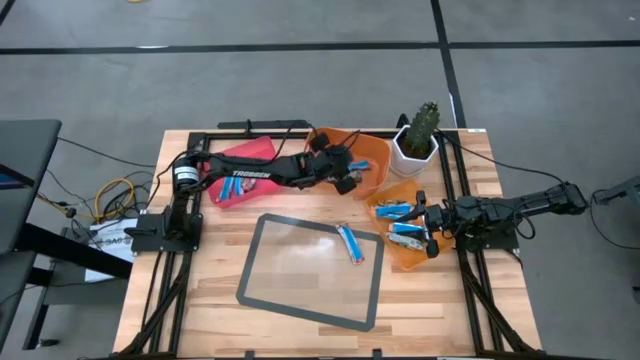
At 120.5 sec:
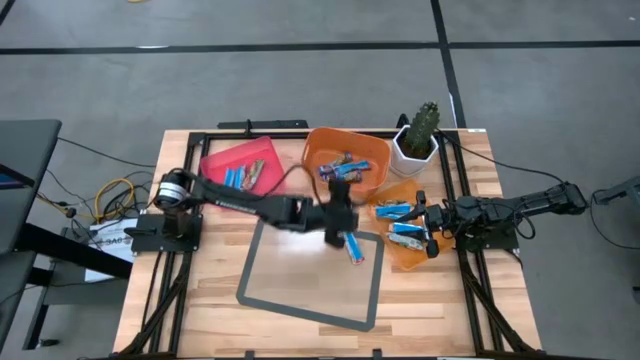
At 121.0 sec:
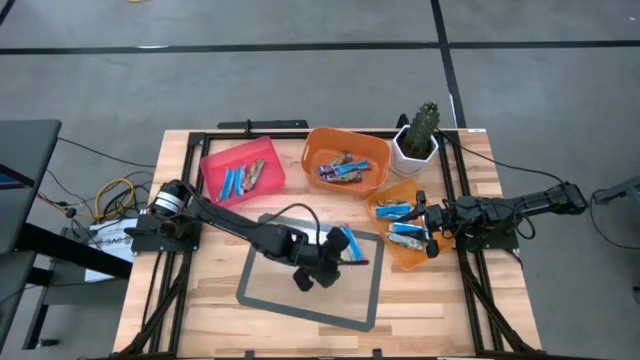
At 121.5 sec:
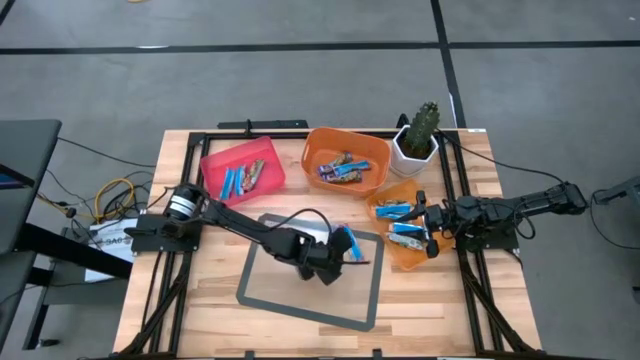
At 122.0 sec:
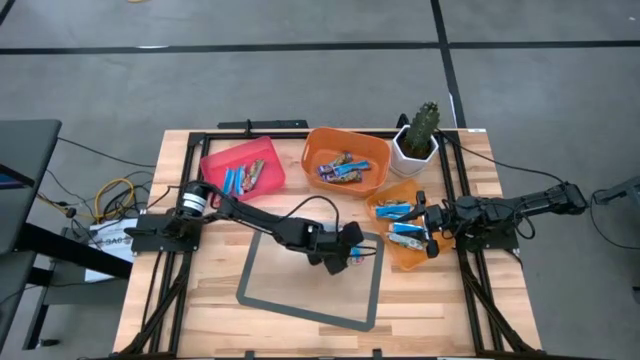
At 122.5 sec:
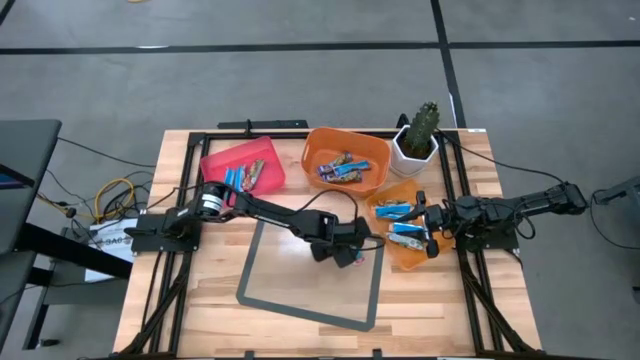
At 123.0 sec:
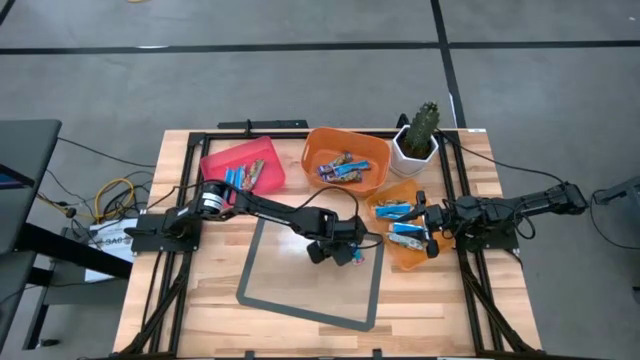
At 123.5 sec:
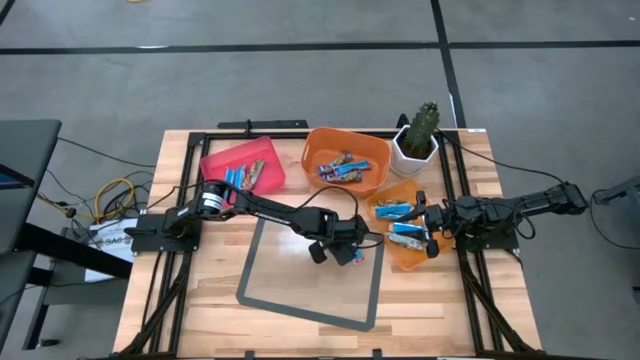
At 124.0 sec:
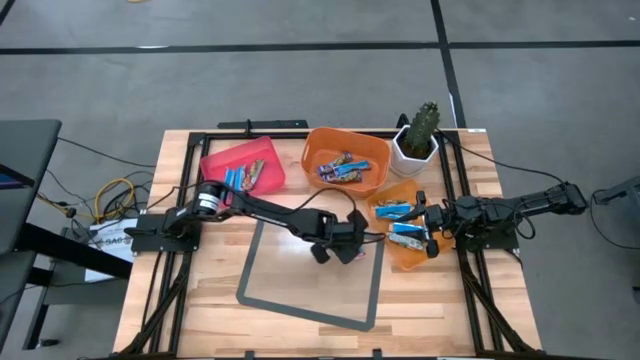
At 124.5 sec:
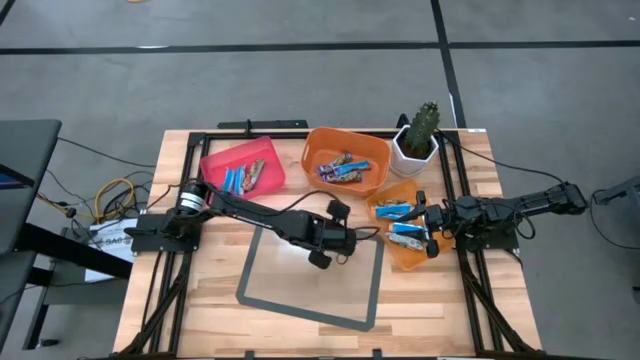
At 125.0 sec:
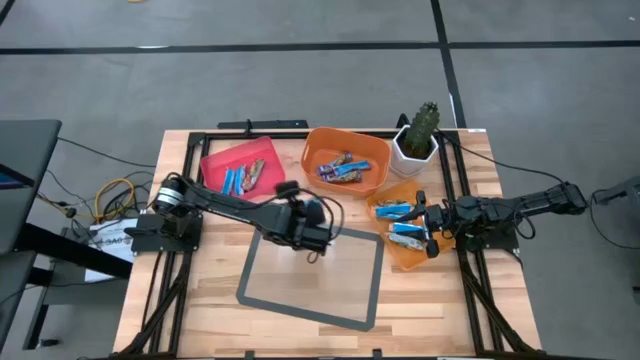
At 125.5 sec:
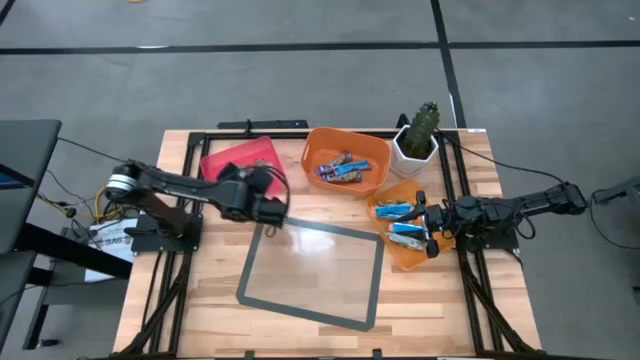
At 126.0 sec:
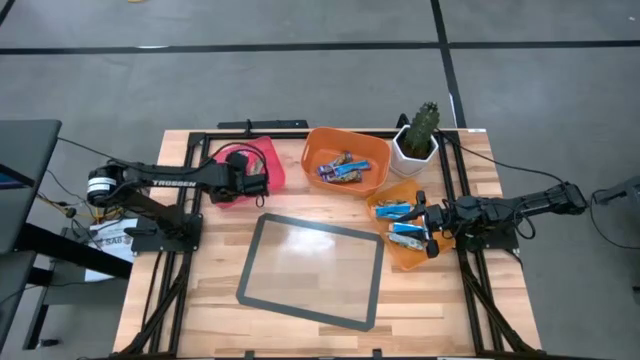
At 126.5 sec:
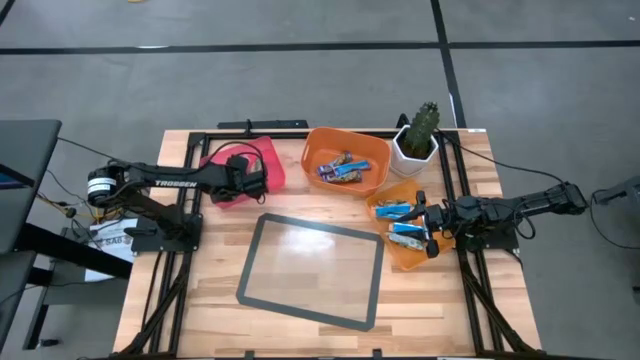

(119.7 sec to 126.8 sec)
Task: Pick and place Granola Bars by type
Put the red granola bar into the red bin

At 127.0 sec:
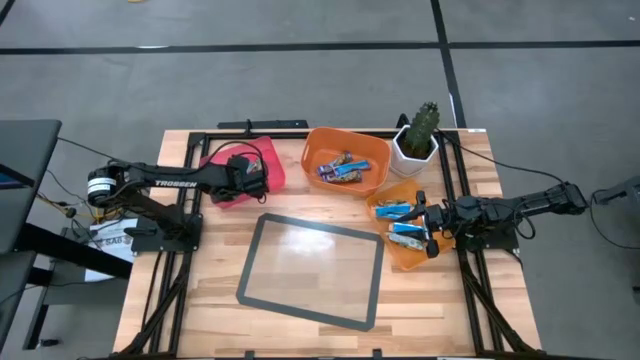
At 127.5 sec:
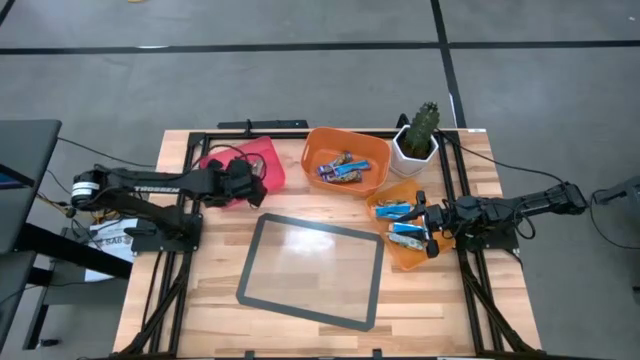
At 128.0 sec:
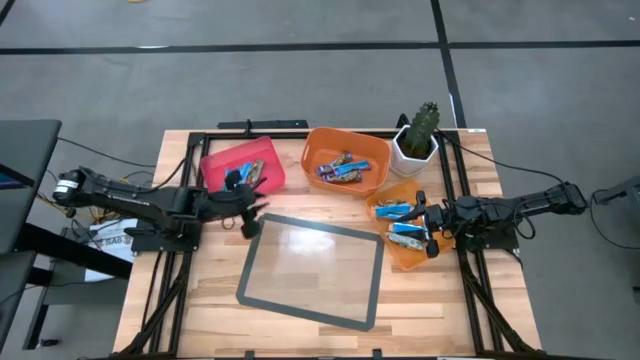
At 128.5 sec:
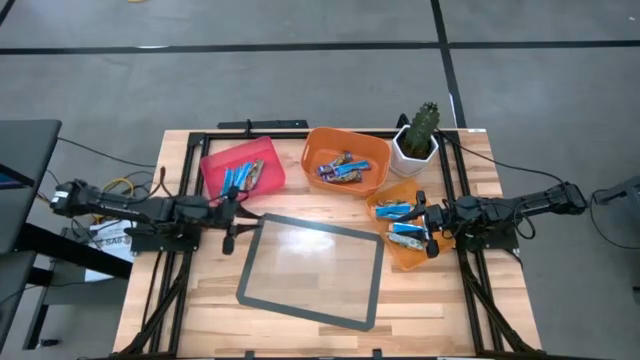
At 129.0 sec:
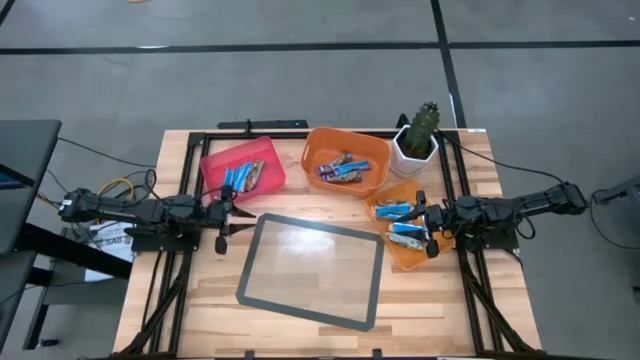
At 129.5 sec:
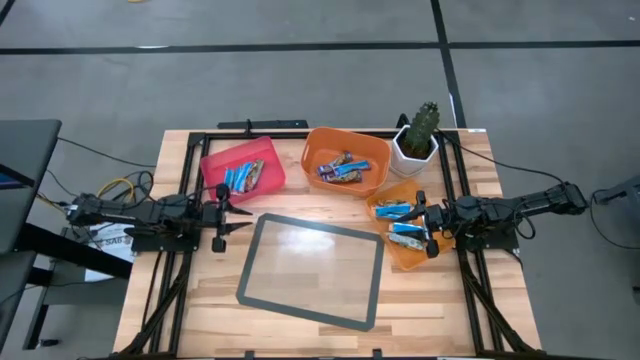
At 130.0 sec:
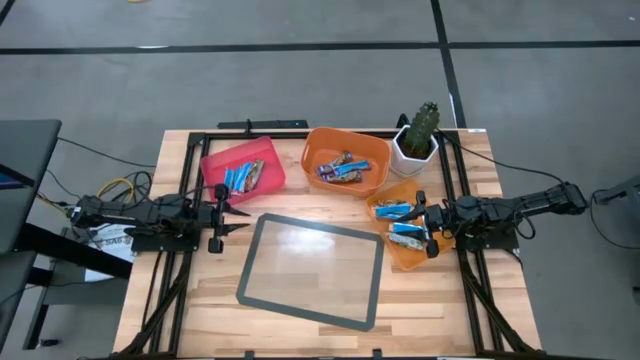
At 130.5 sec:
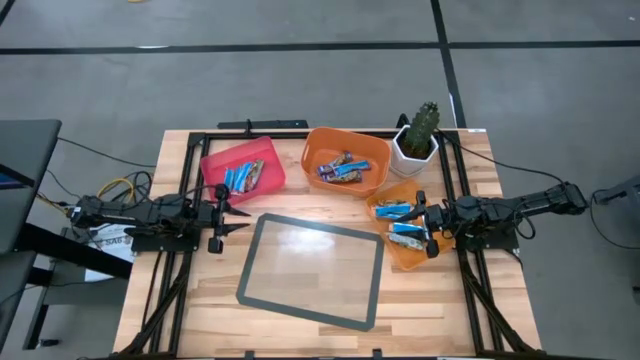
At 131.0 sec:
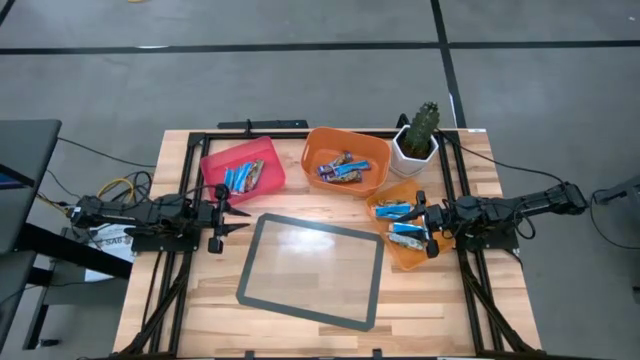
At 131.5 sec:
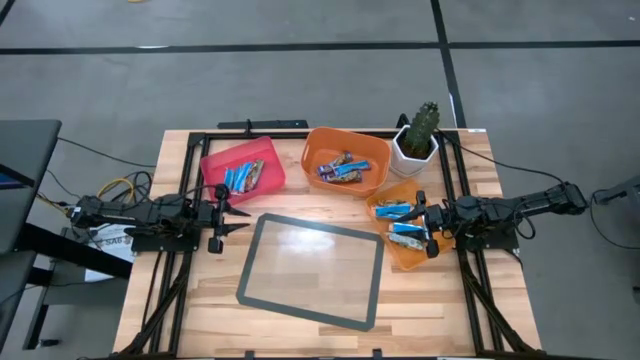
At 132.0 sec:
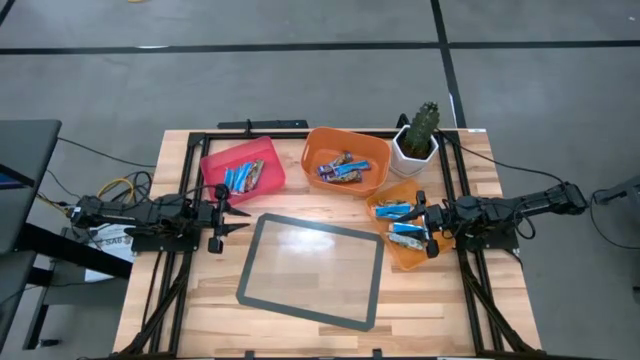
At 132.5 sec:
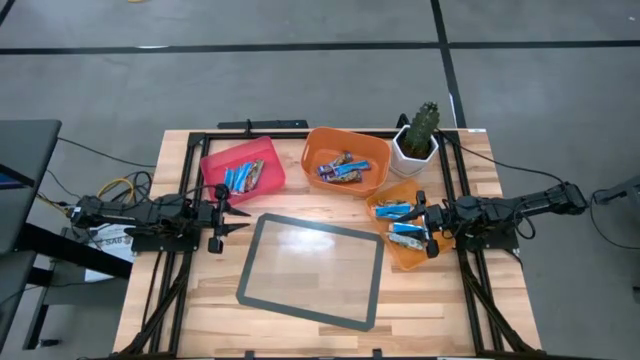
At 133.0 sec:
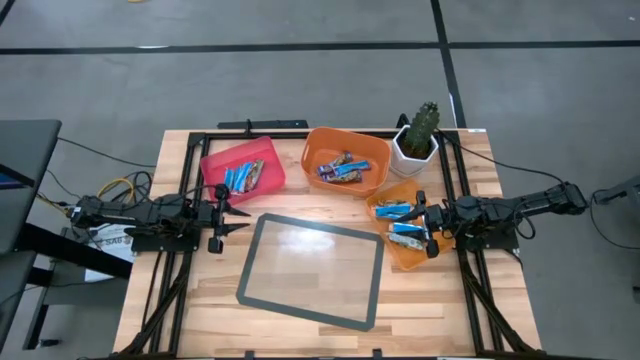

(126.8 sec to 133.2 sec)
Return to Home Position

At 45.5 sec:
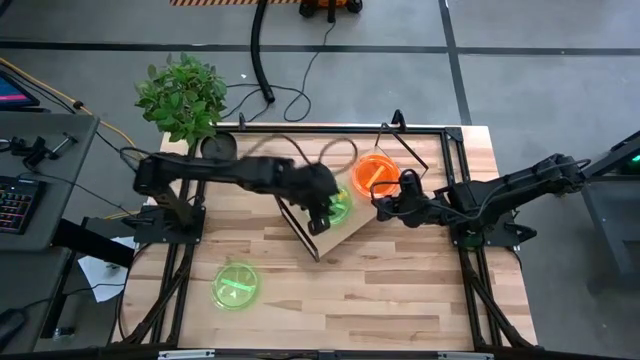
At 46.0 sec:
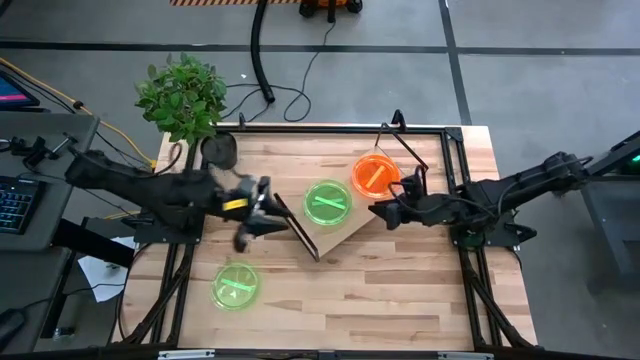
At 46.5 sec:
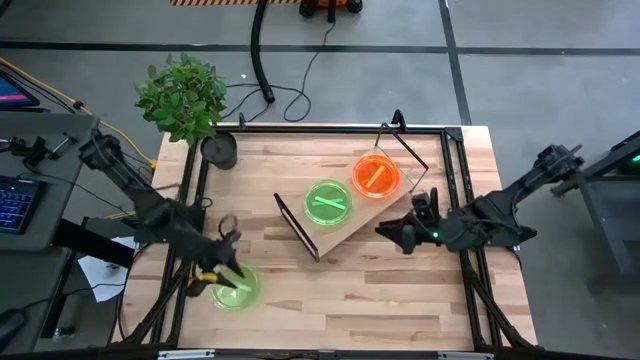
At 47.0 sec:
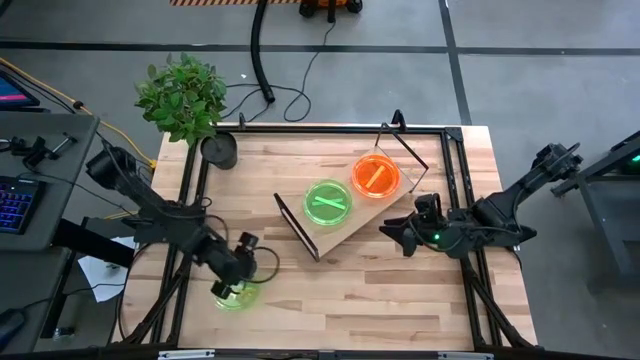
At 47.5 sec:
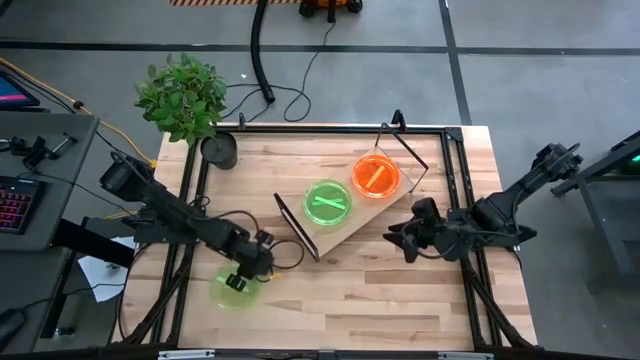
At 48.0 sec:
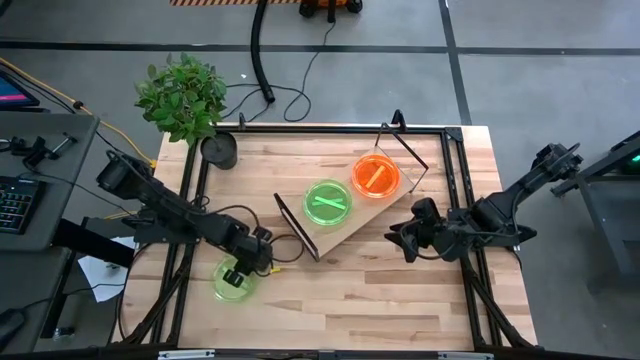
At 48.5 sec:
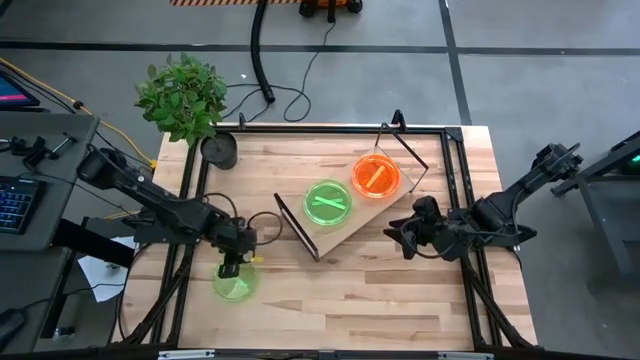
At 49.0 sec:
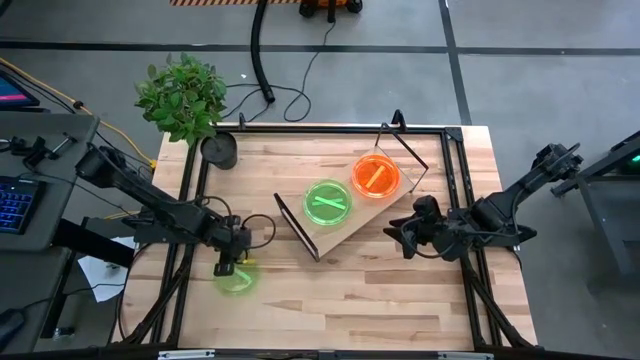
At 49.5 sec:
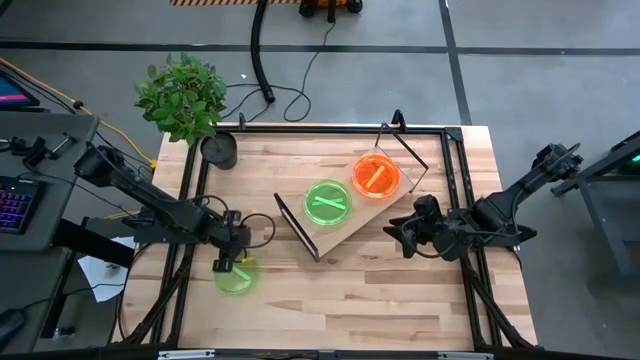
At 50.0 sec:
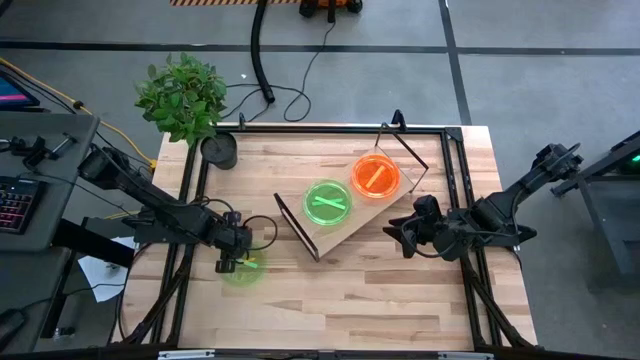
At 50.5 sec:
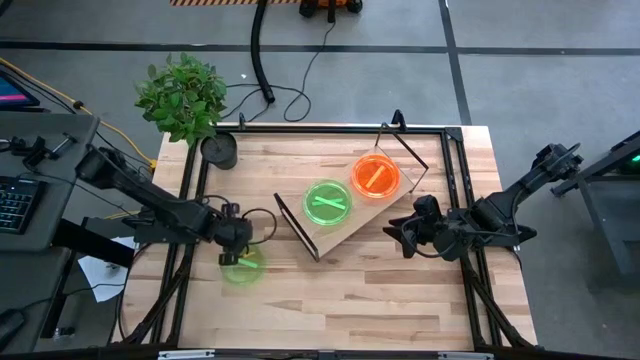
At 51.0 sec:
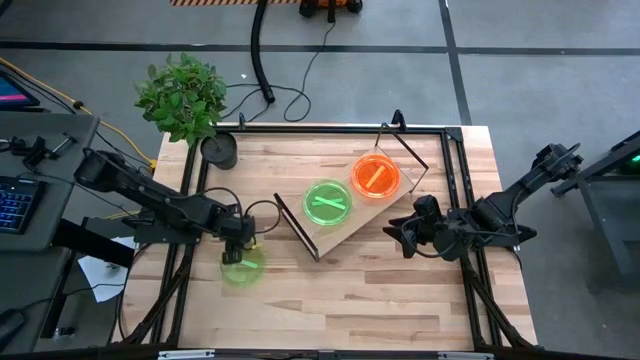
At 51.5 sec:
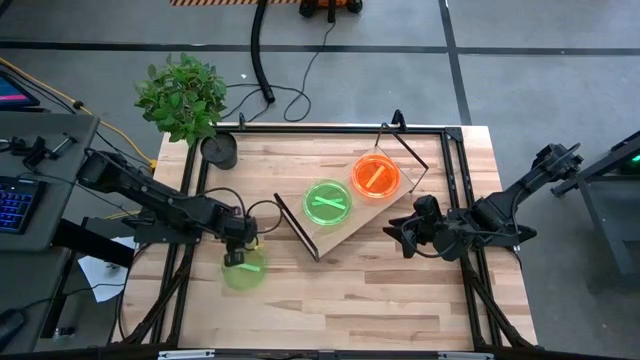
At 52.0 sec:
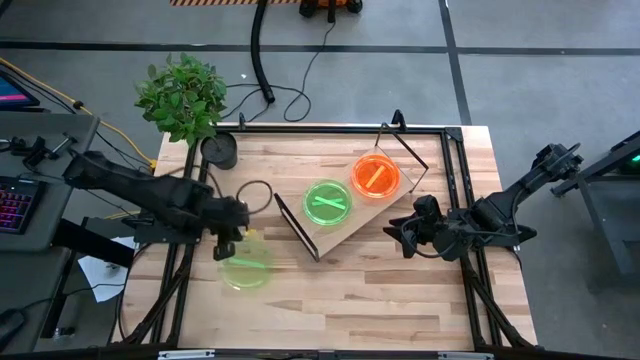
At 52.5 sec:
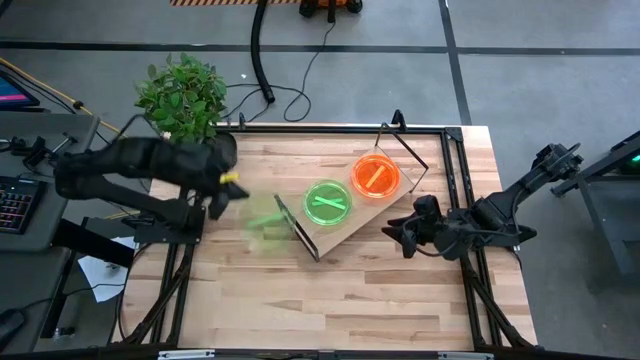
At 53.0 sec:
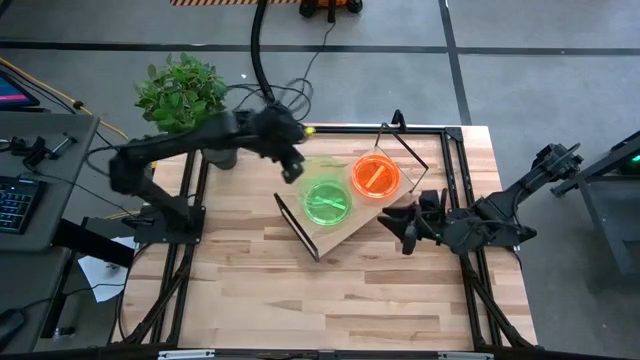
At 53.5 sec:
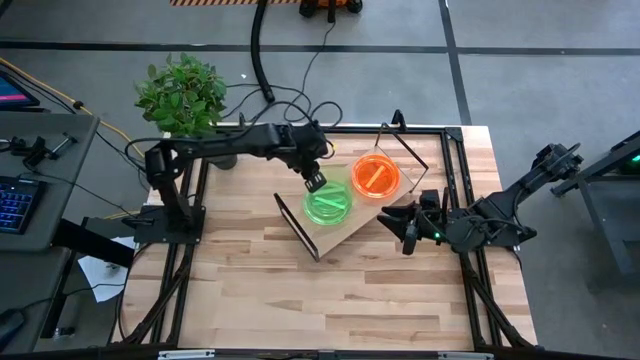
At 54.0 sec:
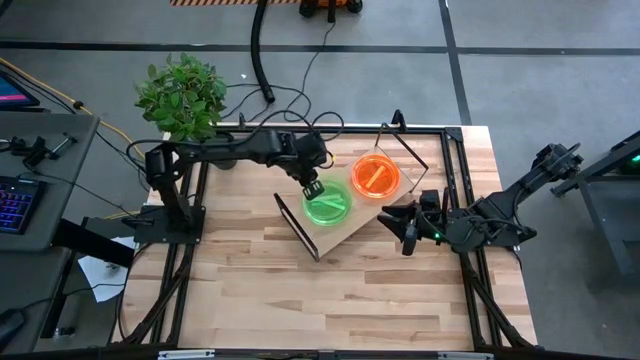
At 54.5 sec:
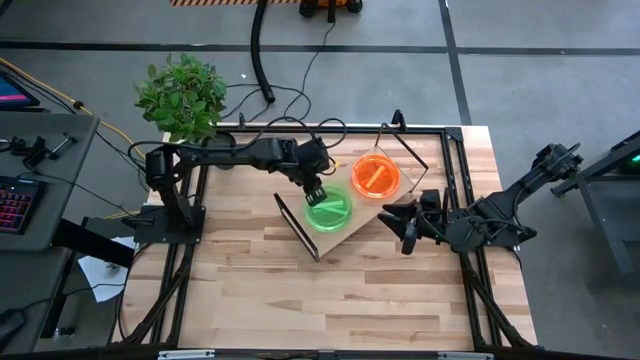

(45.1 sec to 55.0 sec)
Task: Place and stack plates onto a shelf
Stack the green plate on the top of the green plate on the shelf
